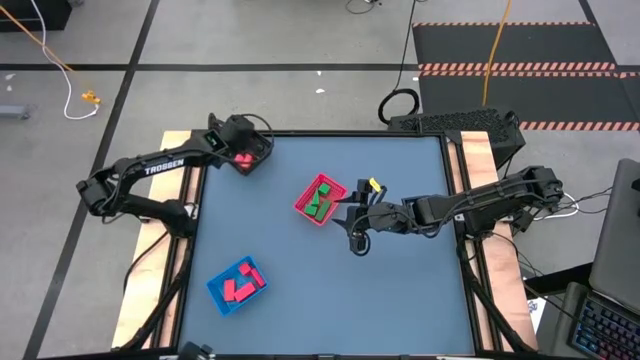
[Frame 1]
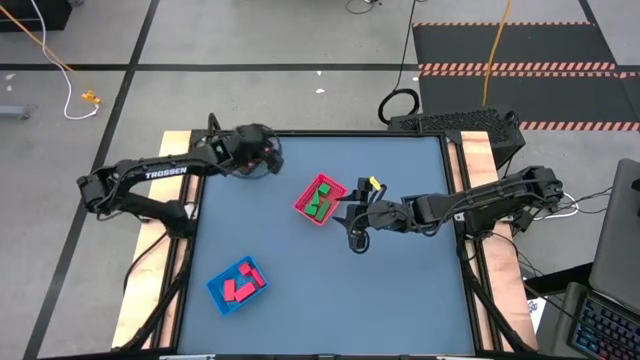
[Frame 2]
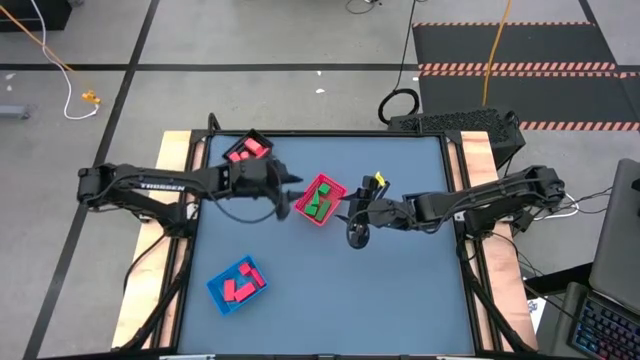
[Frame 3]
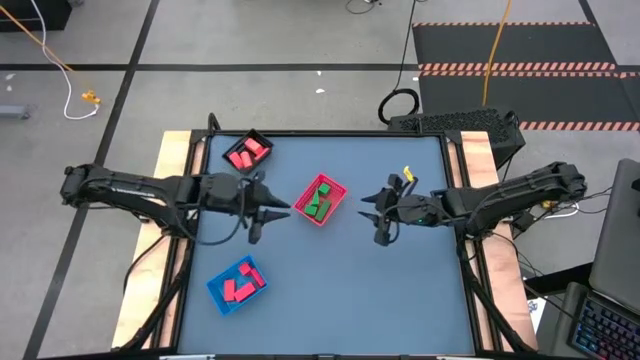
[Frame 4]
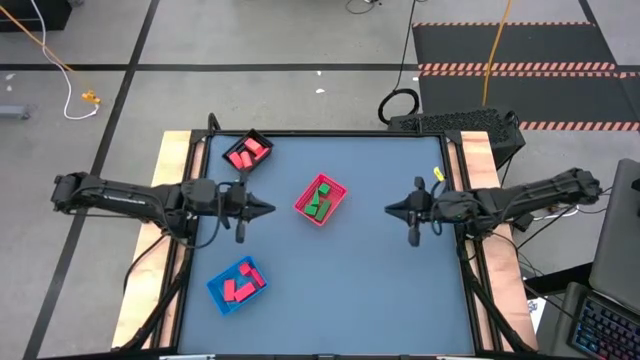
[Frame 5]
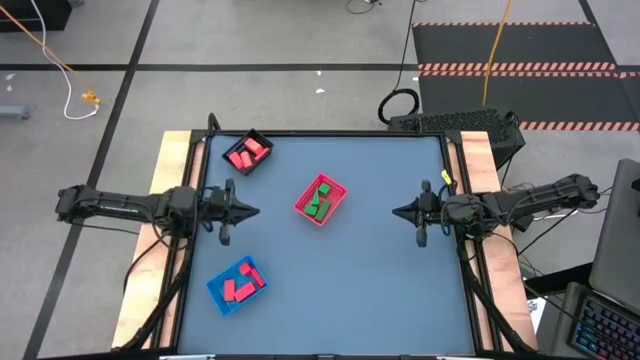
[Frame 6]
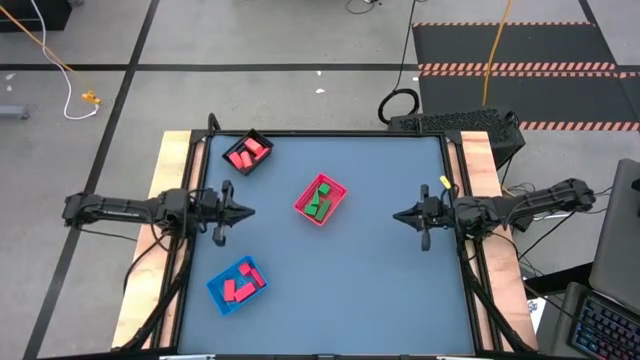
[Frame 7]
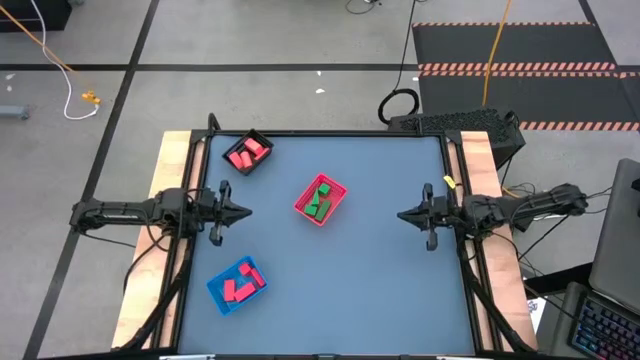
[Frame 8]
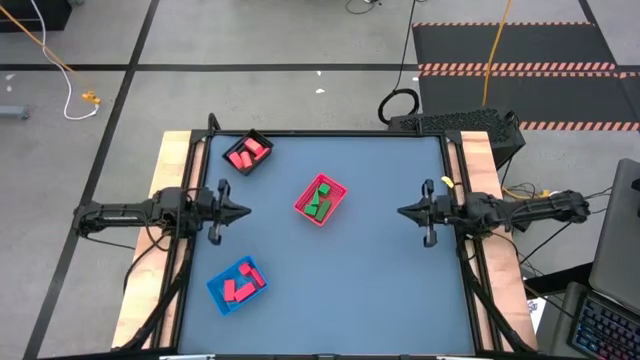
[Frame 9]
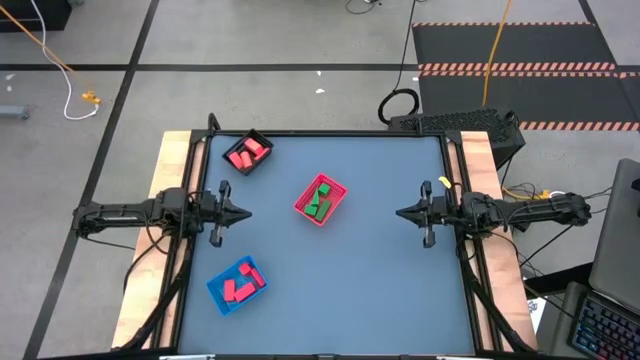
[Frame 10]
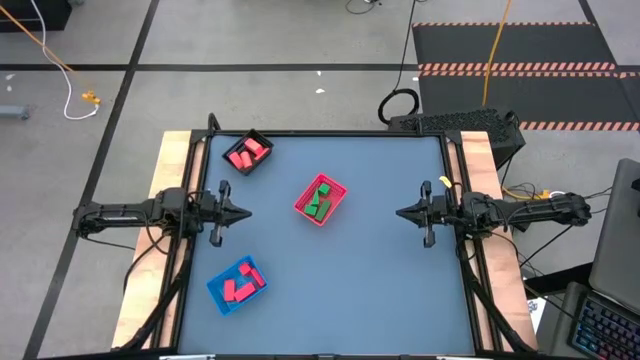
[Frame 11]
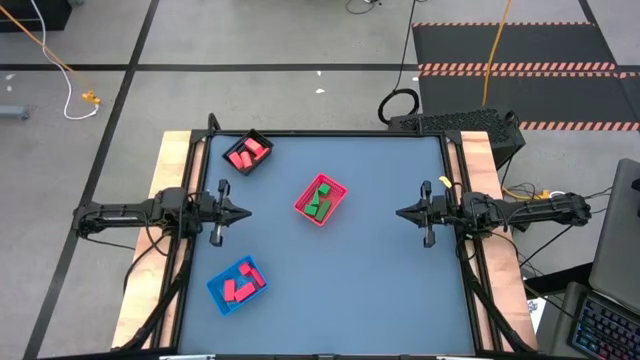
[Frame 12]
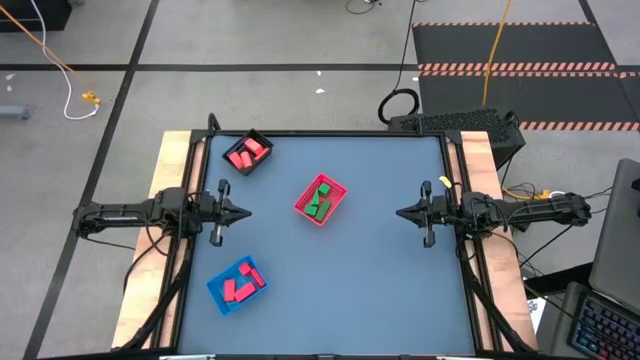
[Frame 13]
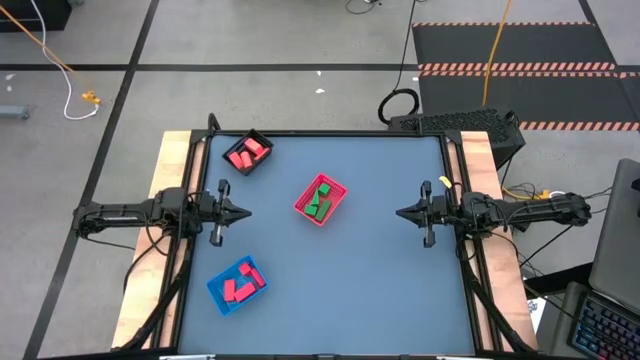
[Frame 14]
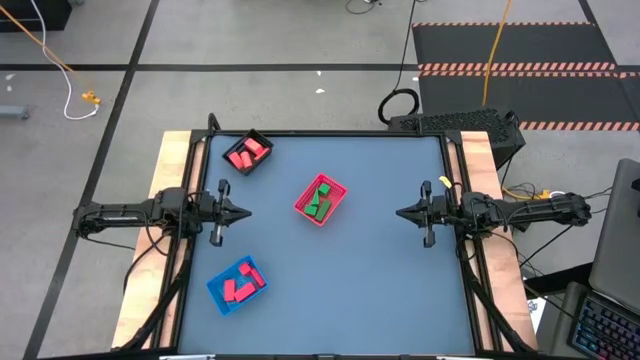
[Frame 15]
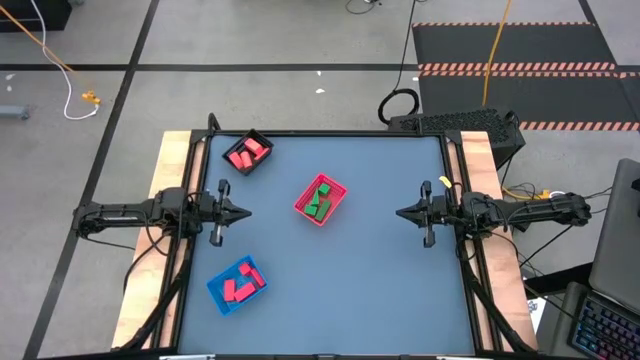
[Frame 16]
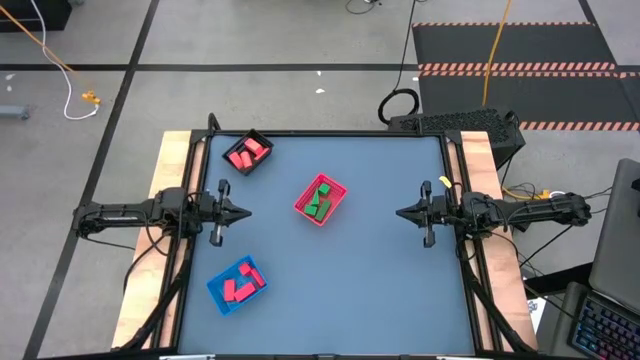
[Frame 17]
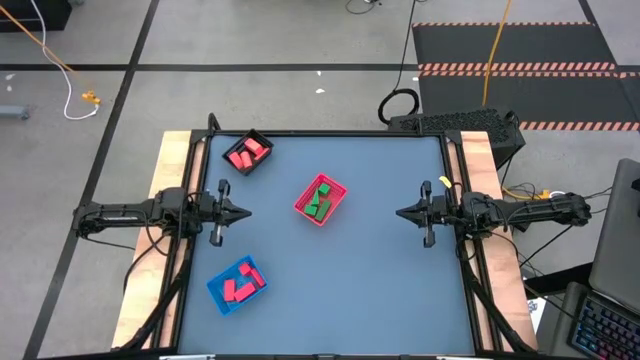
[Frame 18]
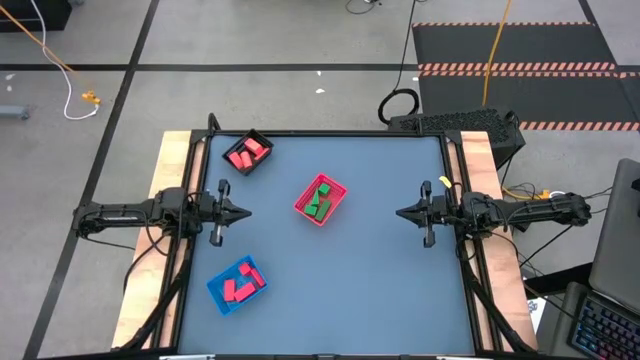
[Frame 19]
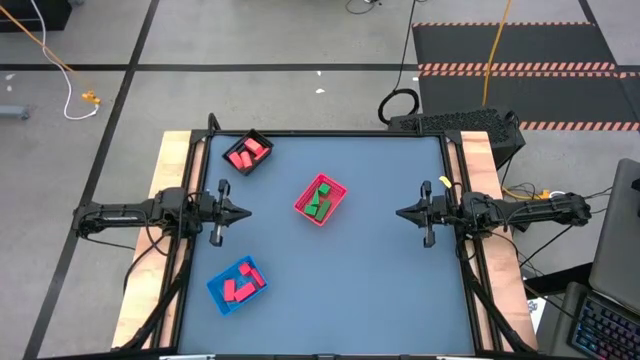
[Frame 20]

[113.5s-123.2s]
Task: Sort & place blocks by color
Return to Home Position

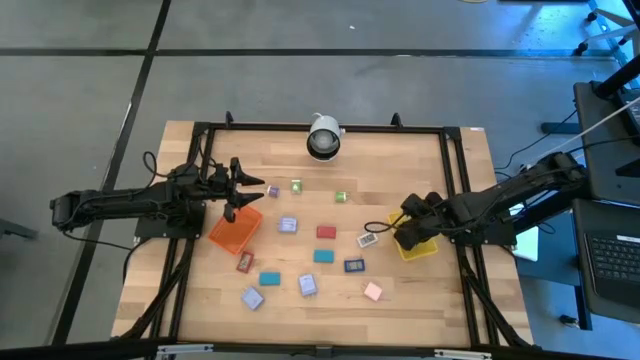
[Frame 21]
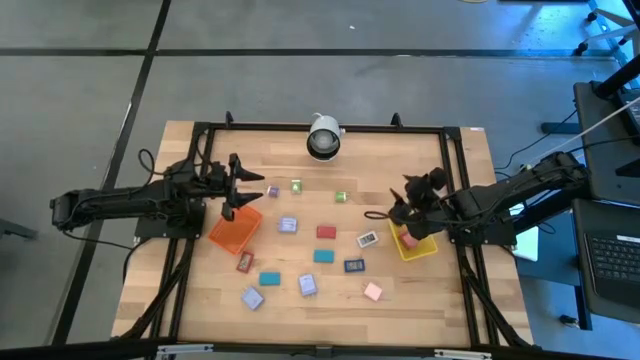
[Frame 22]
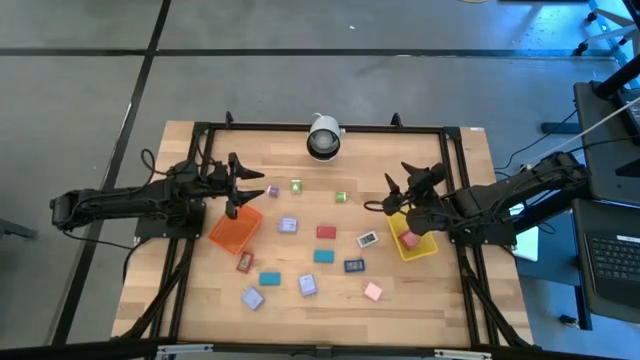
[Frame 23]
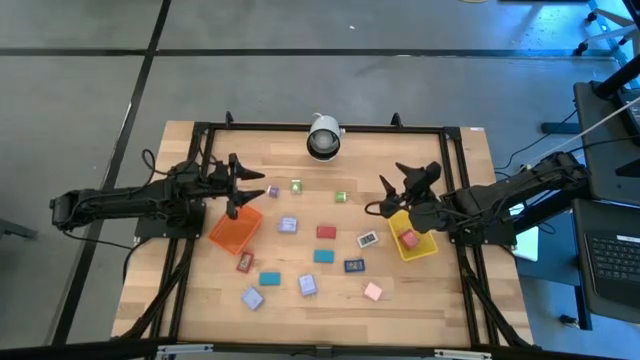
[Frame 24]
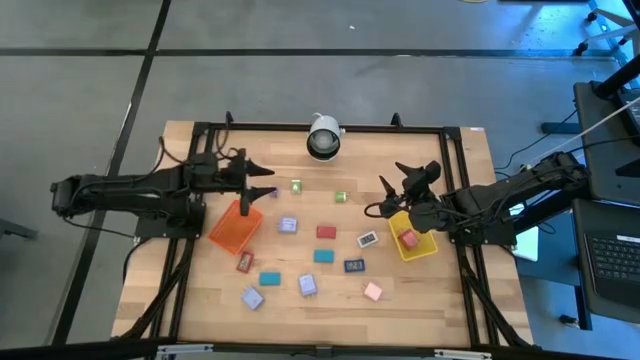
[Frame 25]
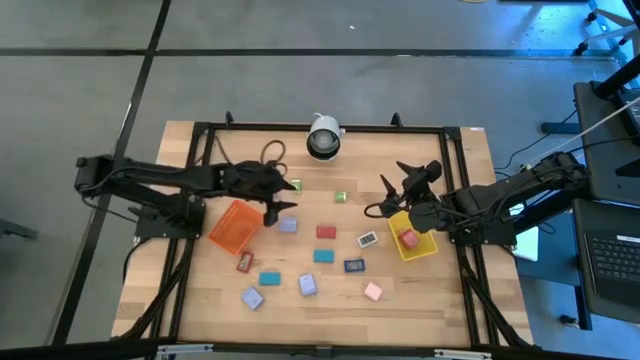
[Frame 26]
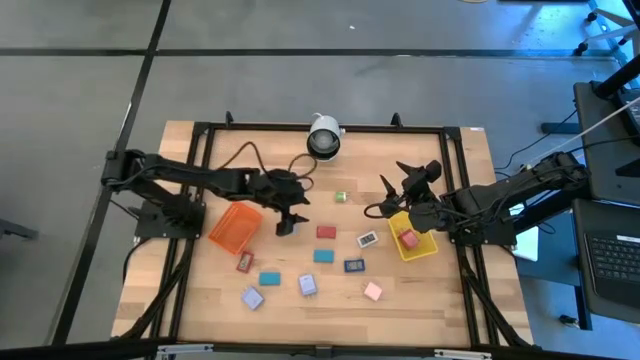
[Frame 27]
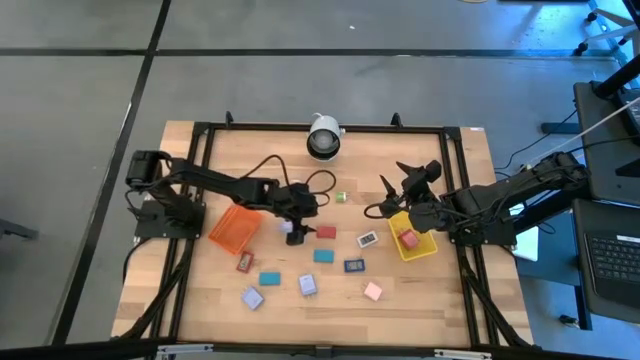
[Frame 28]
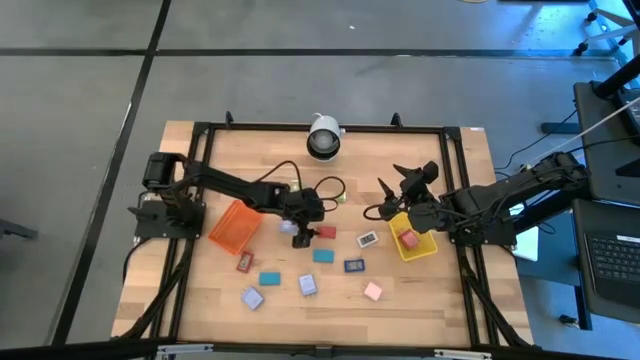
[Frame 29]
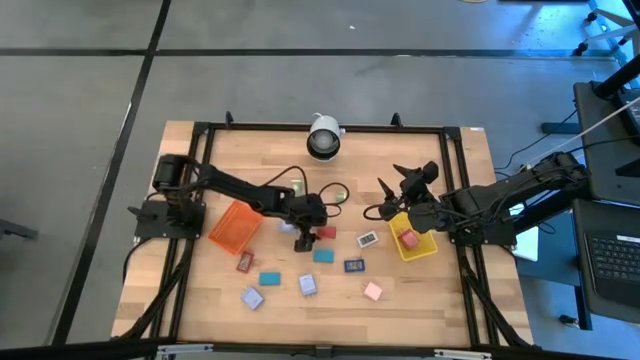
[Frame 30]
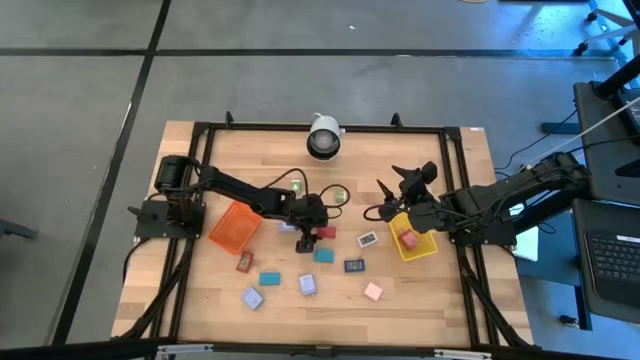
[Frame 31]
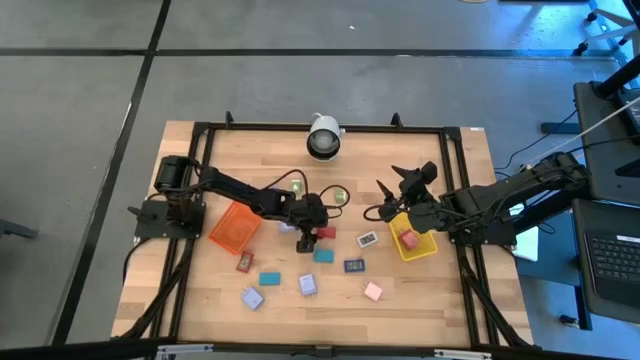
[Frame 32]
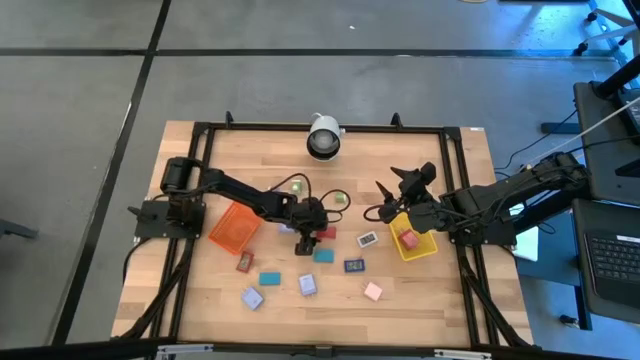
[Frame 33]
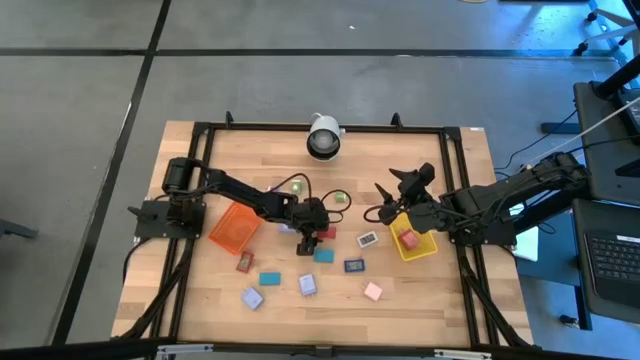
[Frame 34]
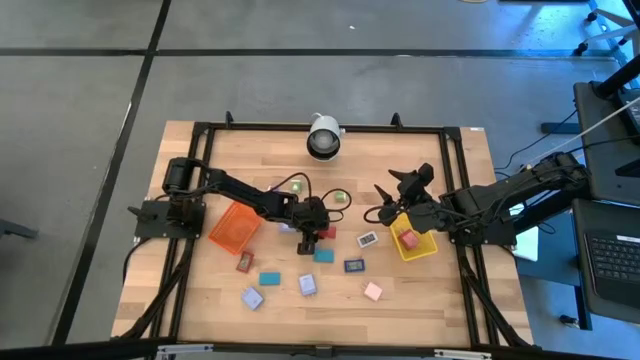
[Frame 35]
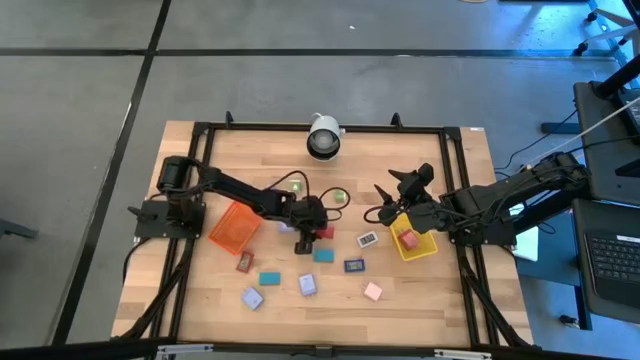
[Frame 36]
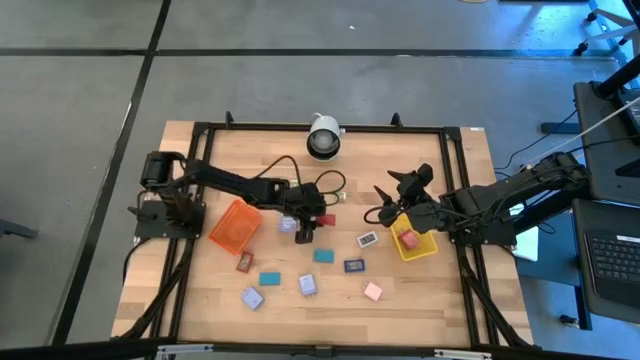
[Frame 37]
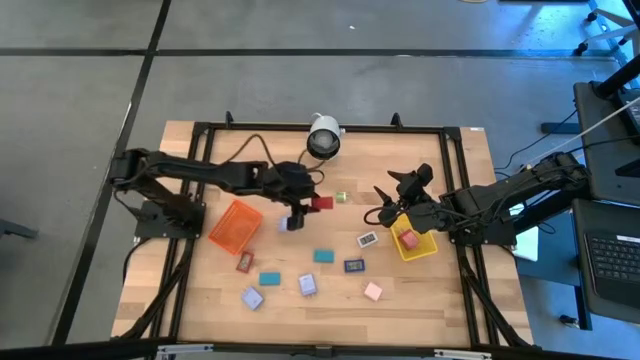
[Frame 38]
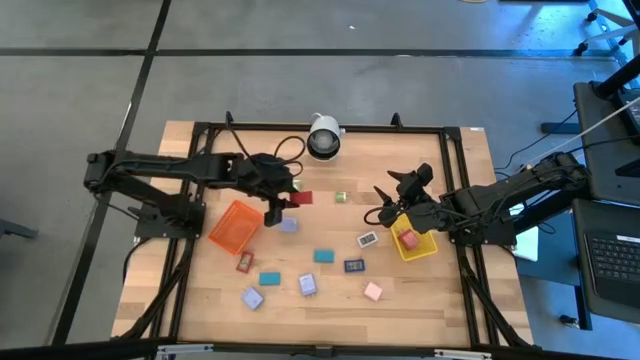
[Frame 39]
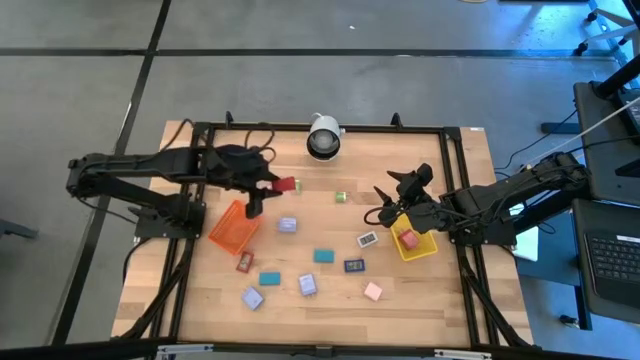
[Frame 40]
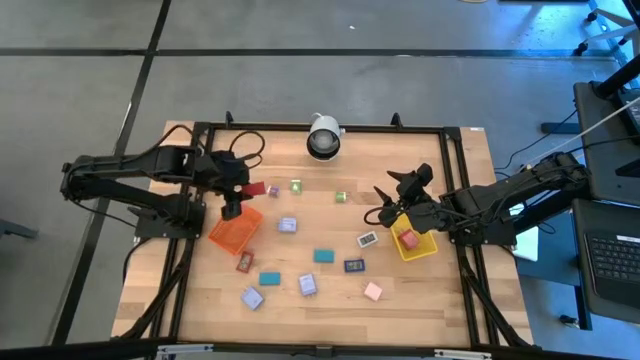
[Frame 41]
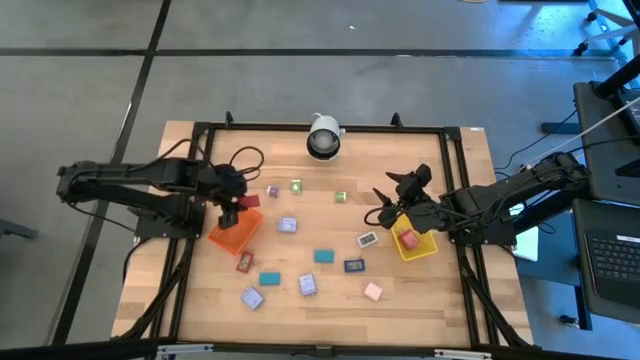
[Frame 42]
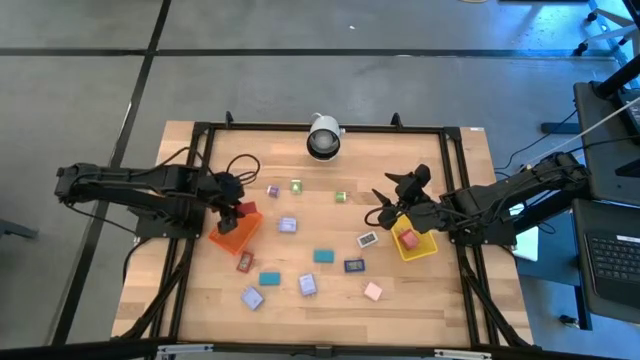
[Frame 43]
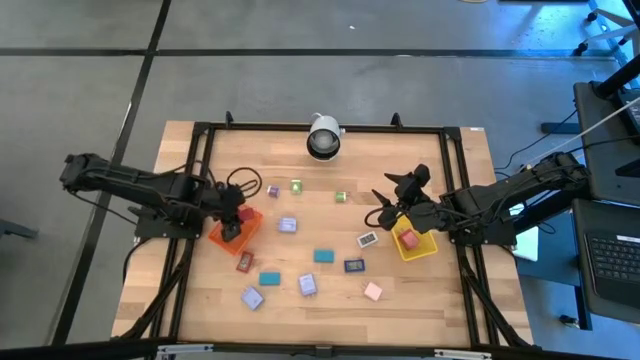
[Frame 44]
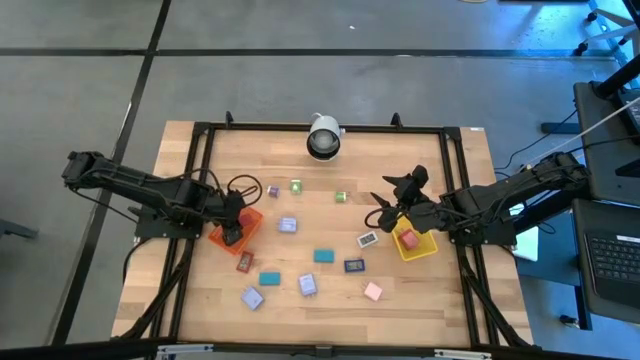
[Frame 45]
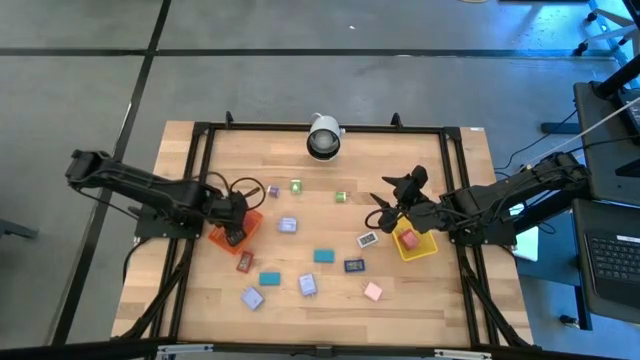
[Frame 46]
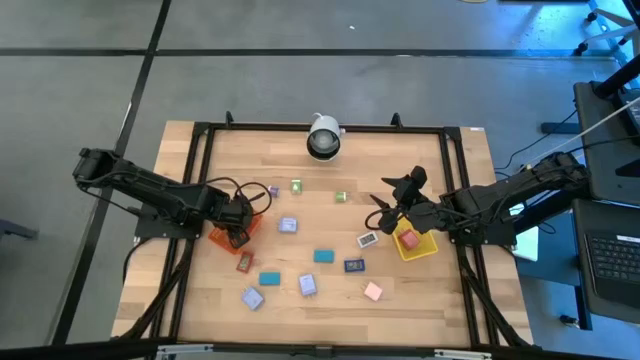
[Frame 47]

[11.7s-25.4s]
Task: Pick & Place Office items
Put the right red digital clock into the orange basket
